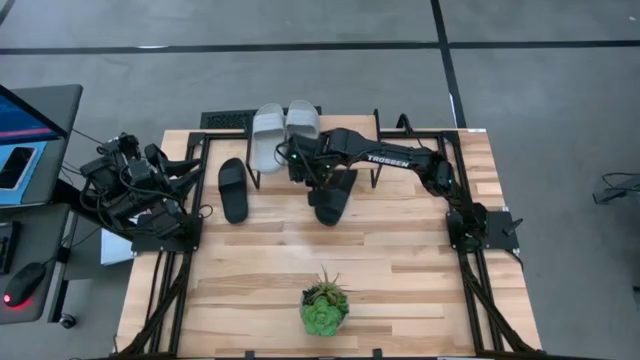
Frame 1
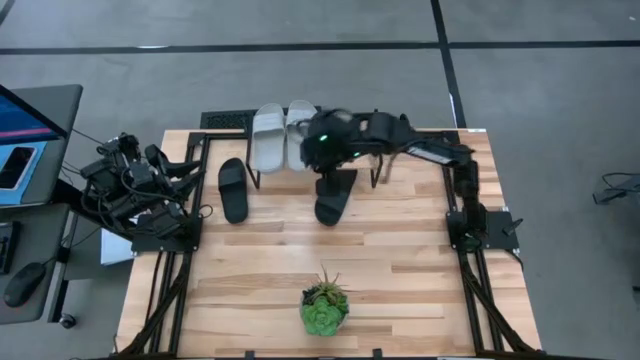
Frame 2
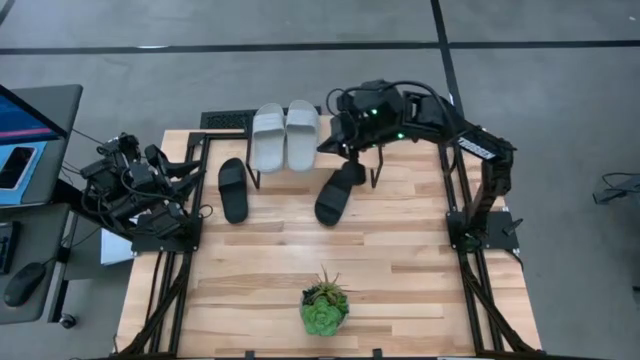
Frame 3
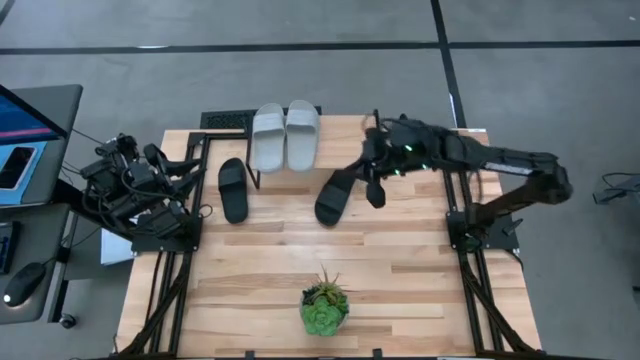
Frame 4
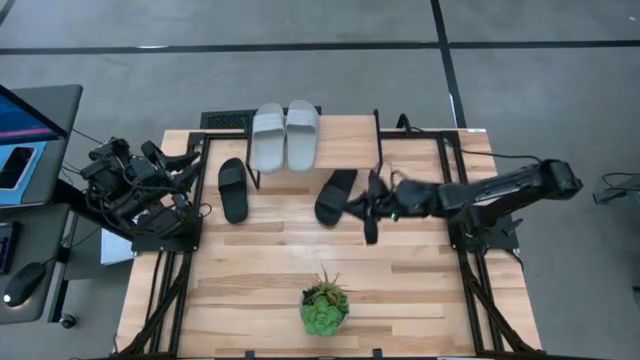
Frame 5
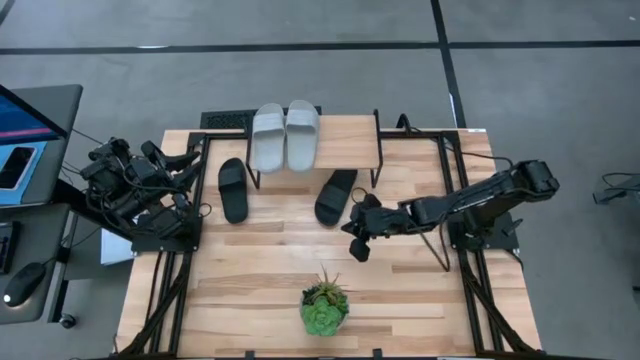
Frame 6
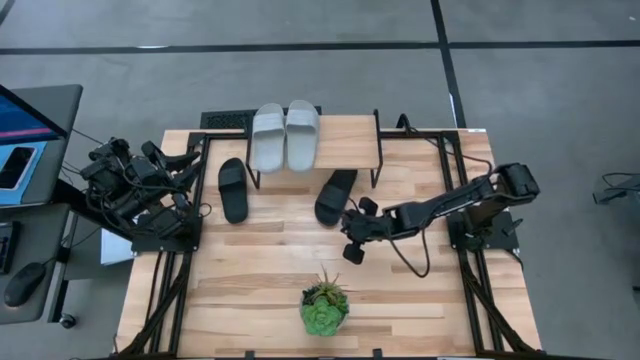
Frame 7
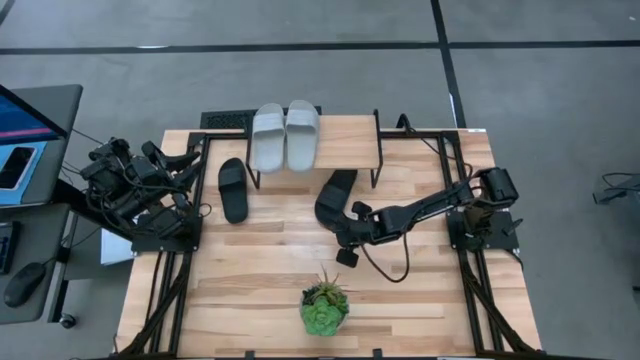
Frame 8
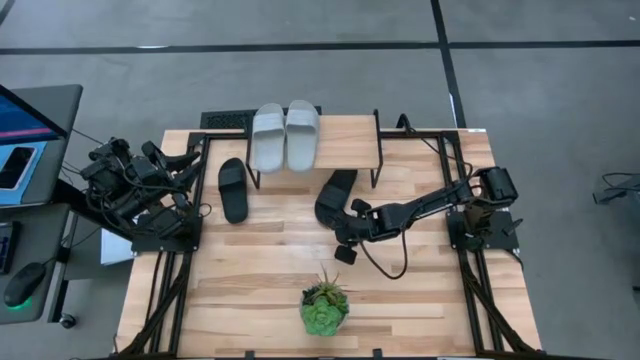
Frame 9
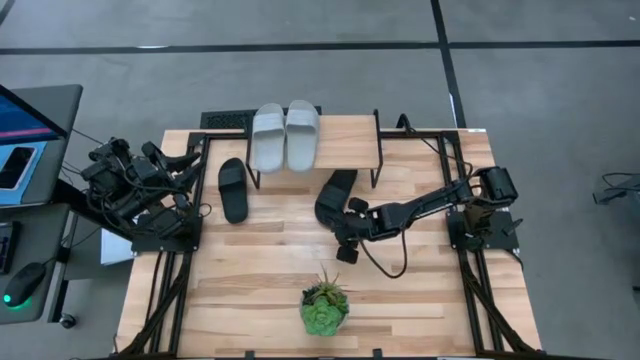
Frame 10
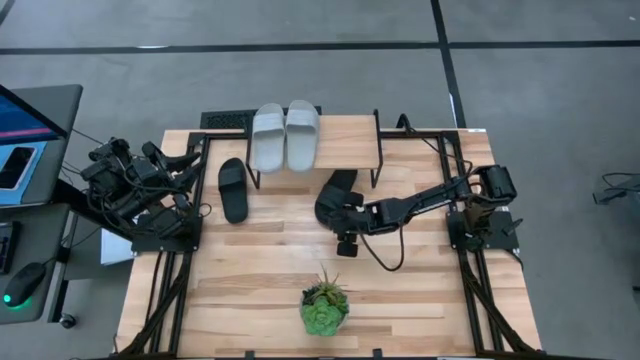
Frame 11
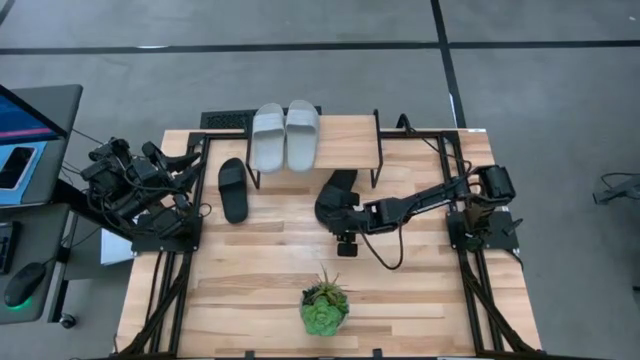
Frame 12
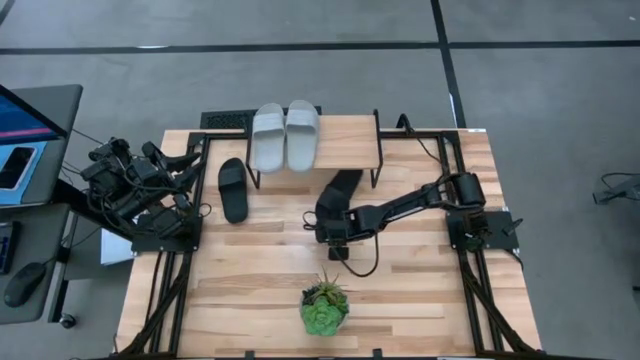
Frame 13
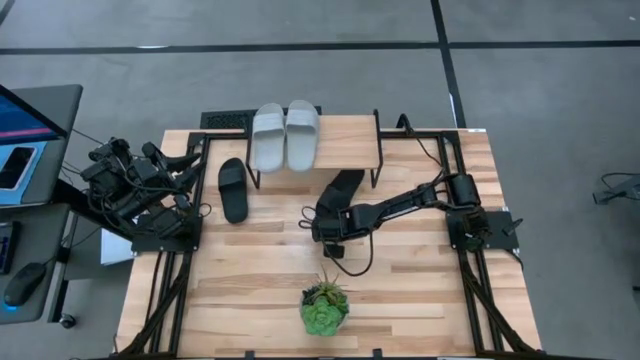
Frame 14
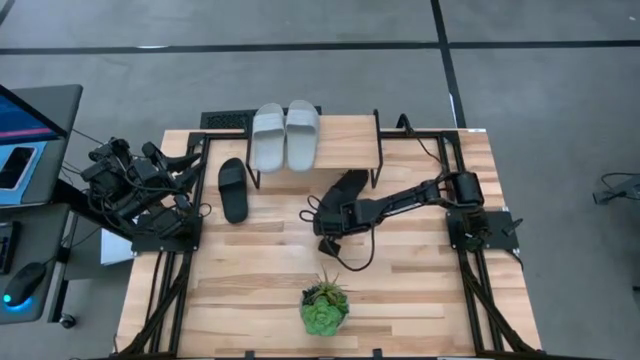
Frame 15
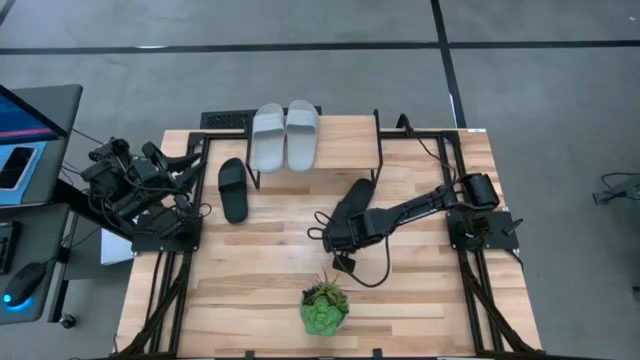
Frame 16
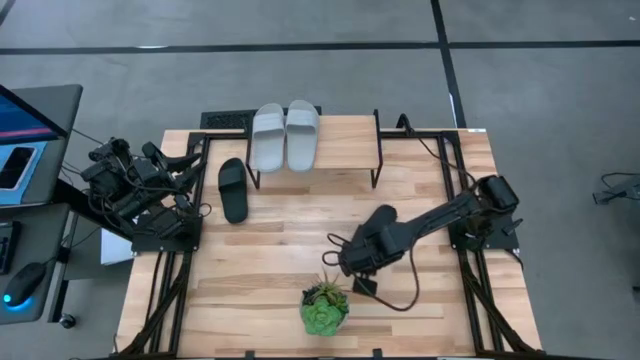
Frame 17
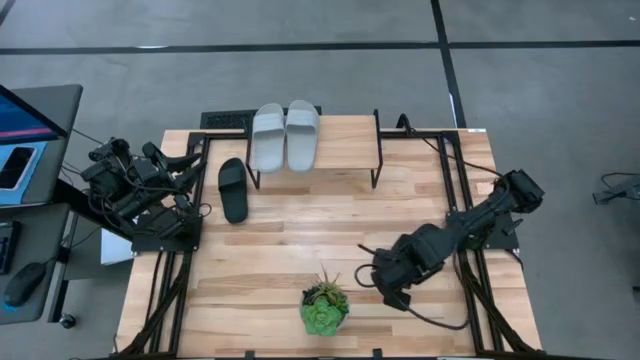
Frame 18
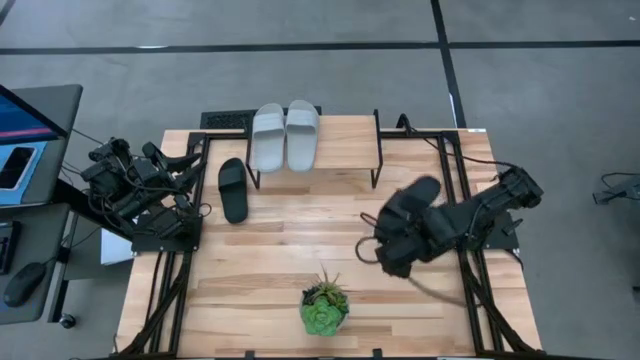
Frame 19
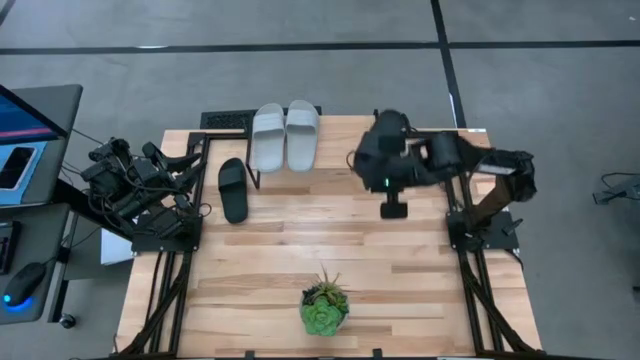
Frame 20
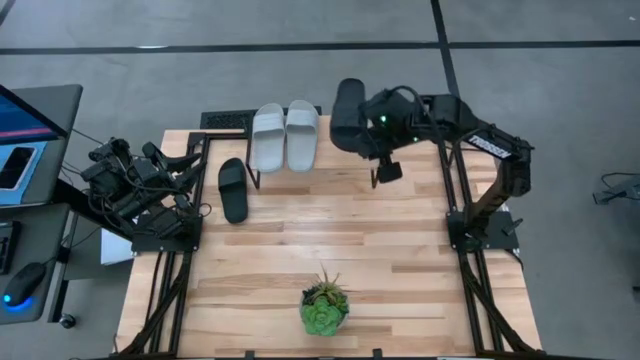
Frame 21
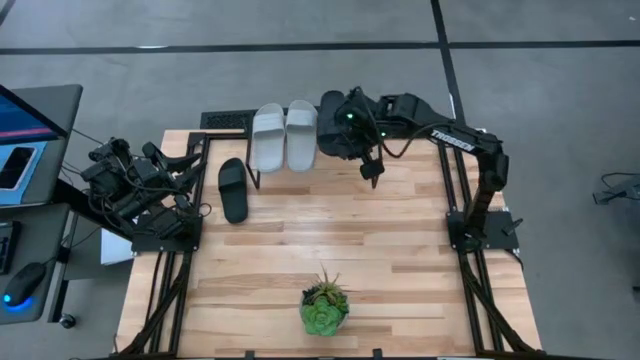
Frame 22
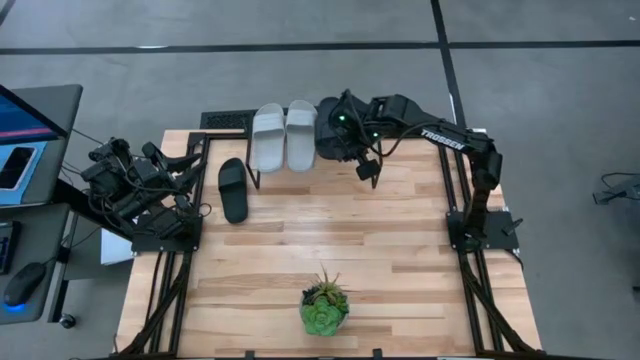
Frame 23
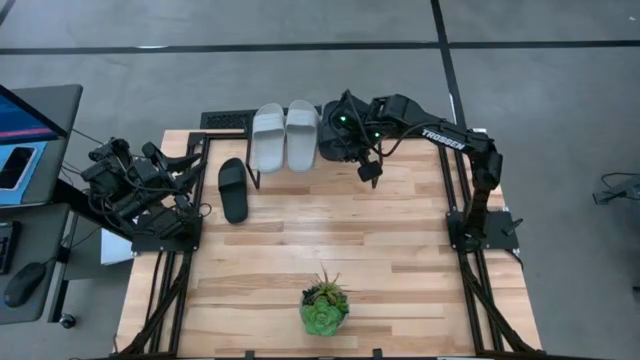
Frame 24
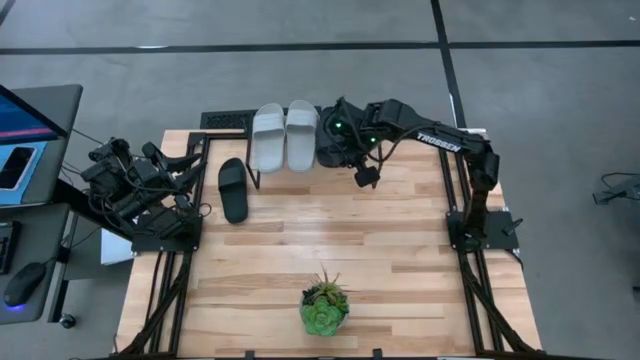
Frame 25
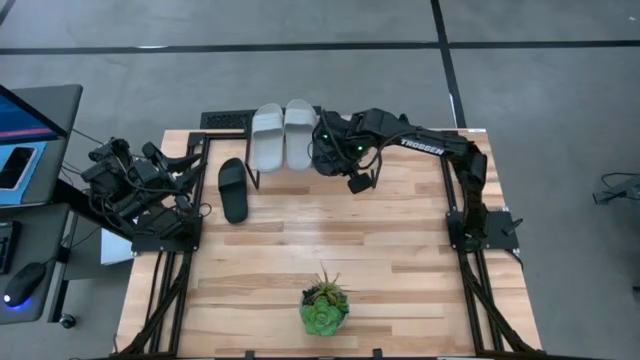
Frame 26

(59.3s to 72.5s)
Task: Pick and place slides into the shelf
Put the right black slide on the shelf

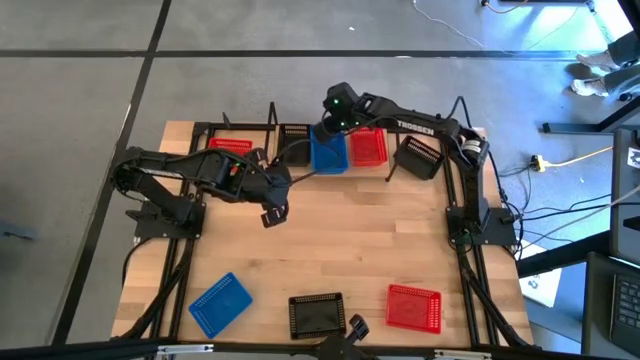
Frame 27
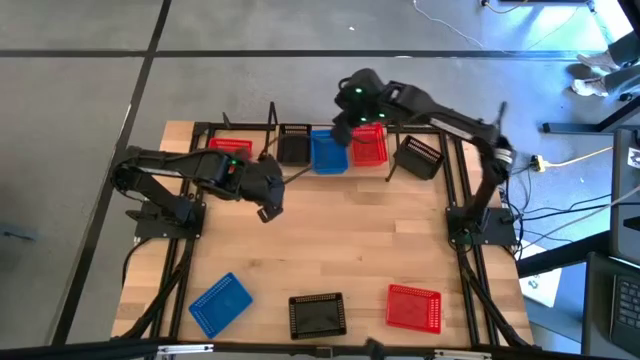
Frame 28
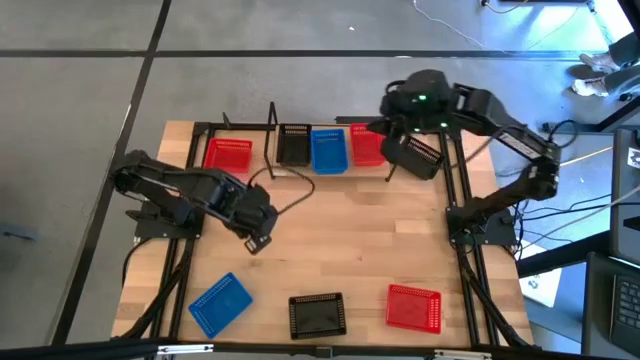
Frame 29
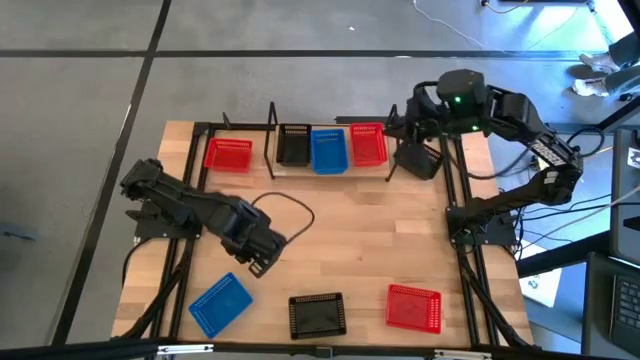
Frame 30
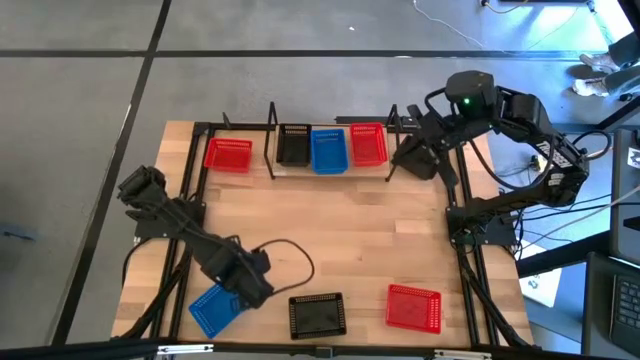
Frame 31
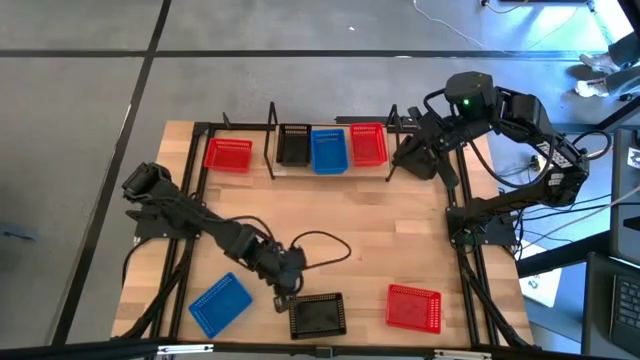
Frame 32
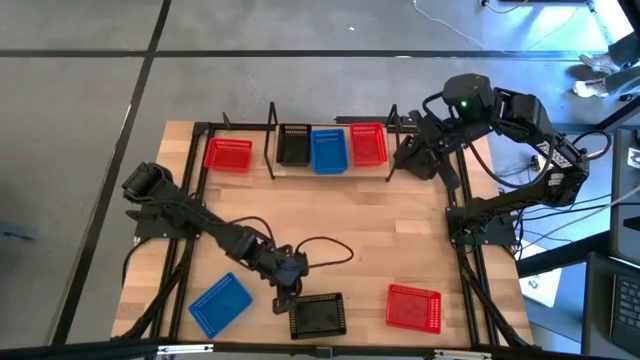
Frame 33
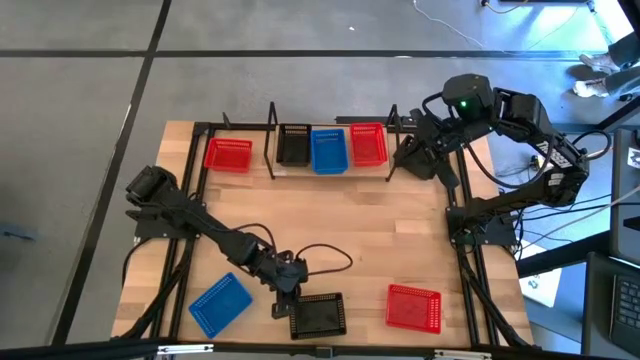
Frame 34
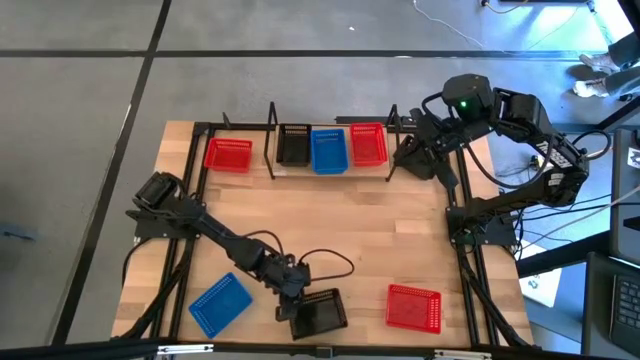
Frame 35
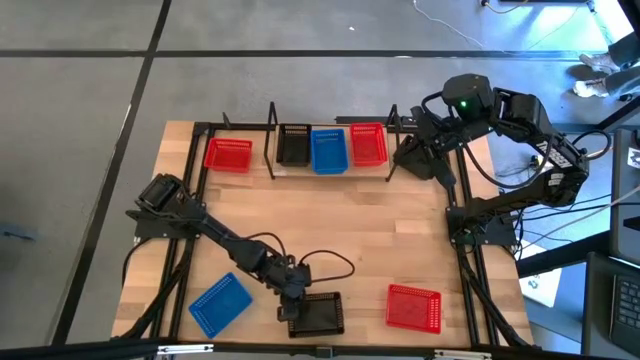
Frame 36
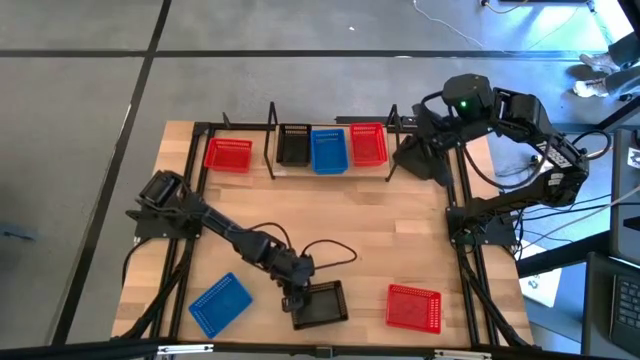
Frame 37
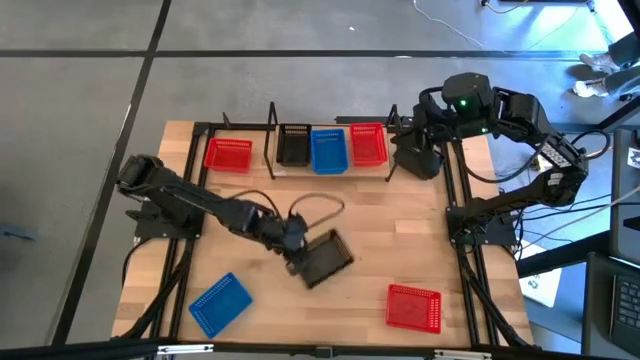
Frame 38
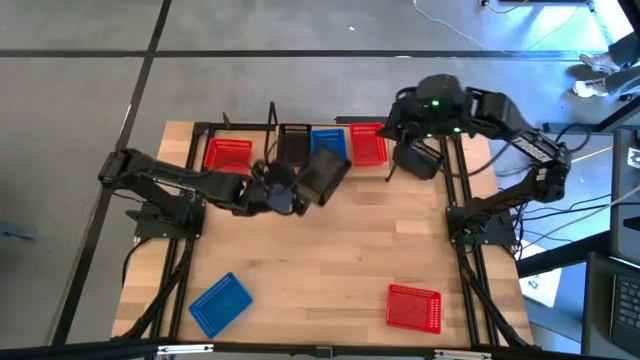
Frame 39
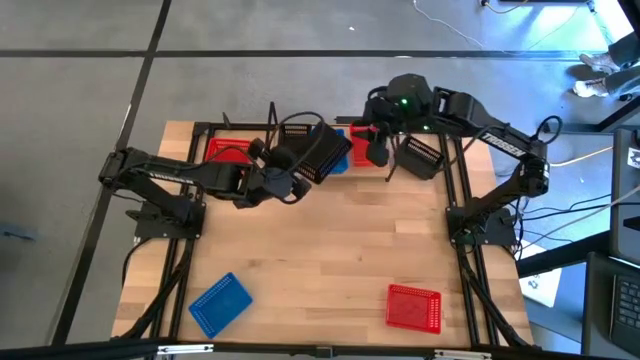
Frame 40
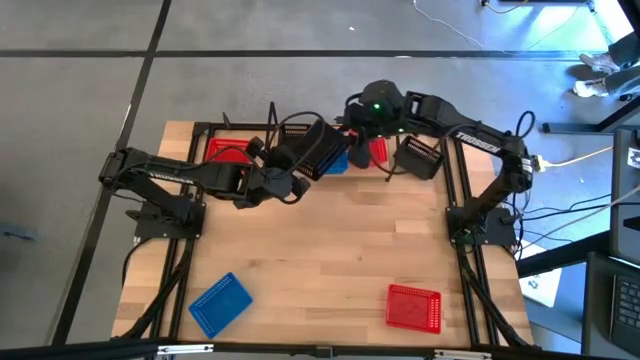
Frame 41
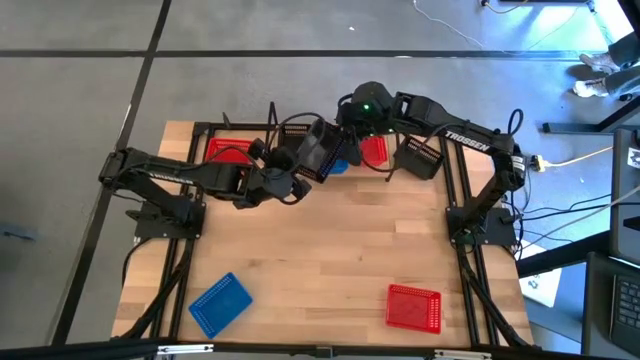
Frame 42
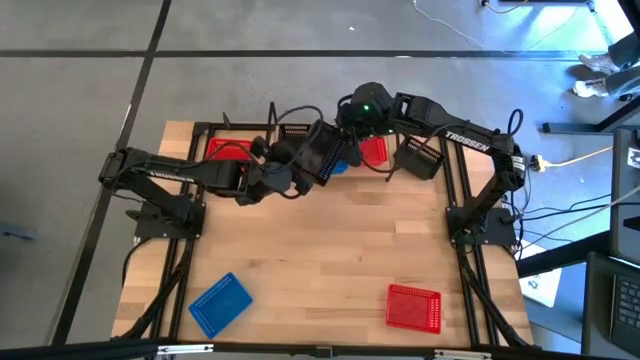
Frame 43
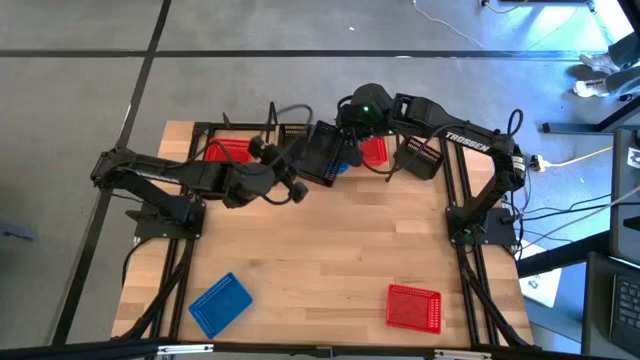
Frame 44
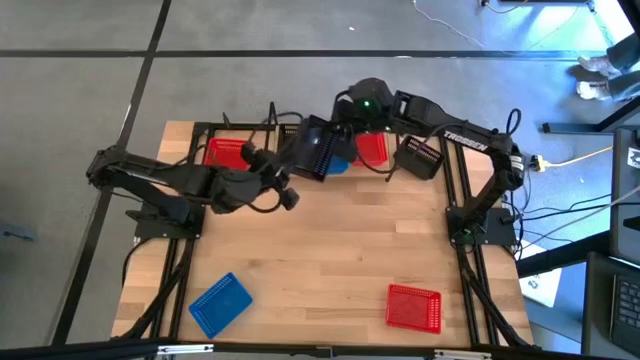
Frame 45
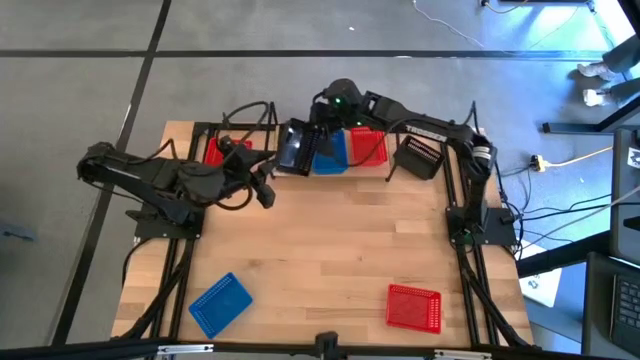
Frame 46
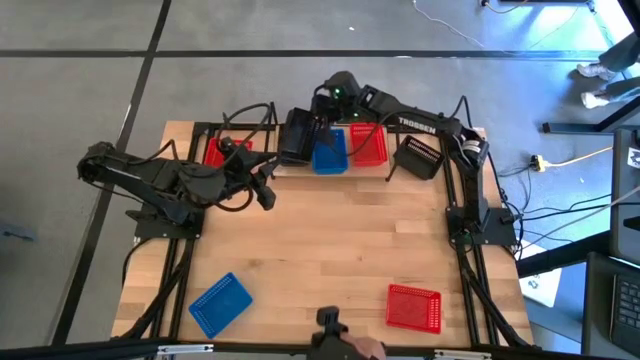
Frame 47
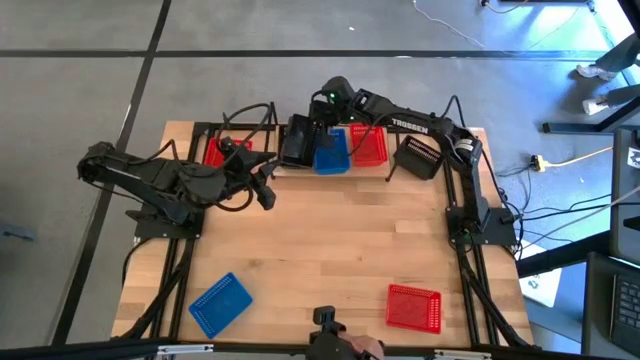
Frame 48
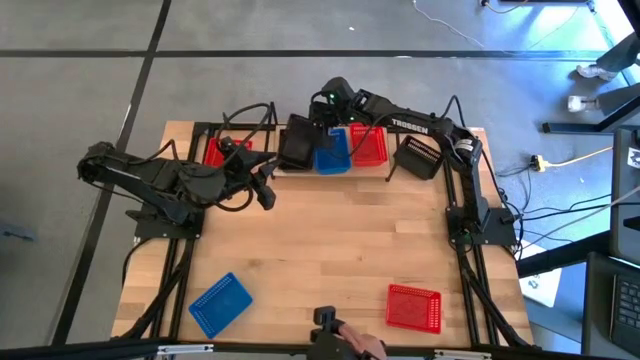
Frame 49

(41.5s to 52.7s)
Task: Stack baskets on shelf by color
Stack the bottom black bin on top of the black bin on the shelf
